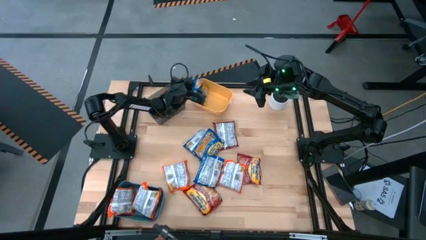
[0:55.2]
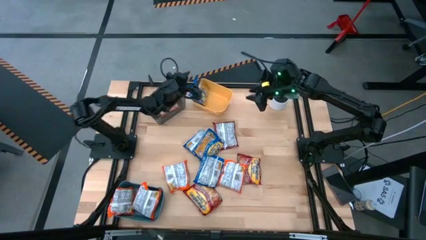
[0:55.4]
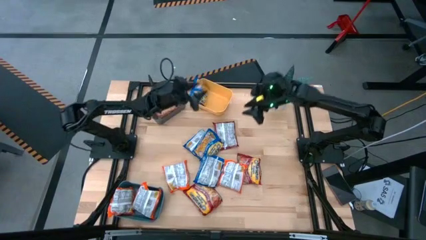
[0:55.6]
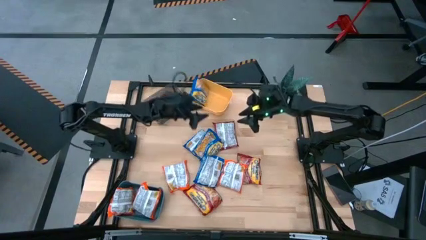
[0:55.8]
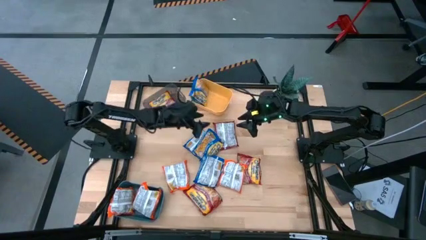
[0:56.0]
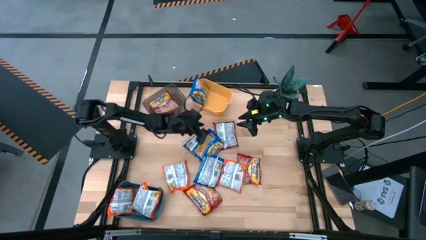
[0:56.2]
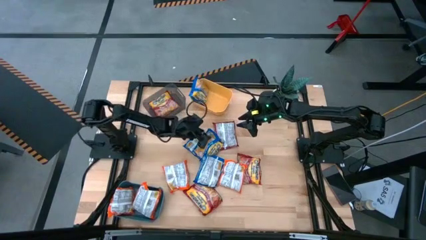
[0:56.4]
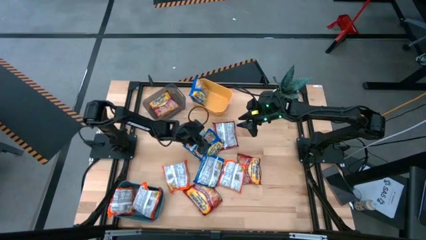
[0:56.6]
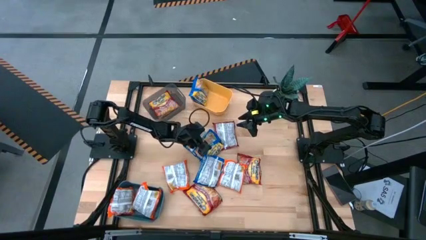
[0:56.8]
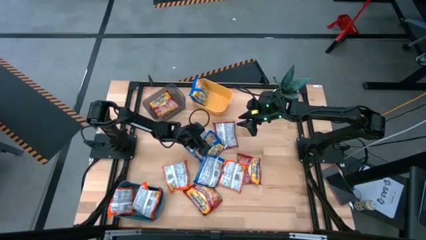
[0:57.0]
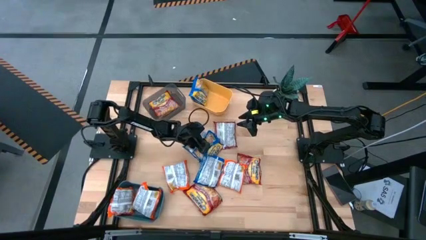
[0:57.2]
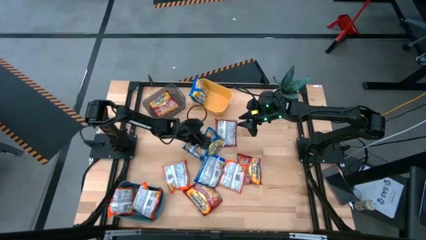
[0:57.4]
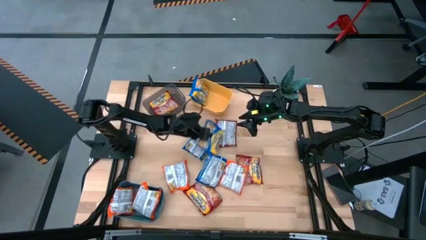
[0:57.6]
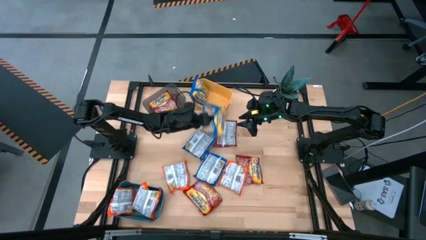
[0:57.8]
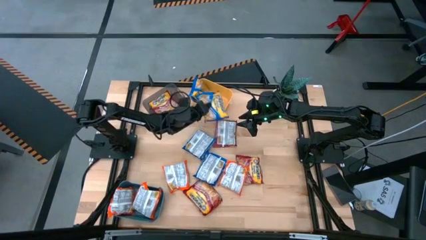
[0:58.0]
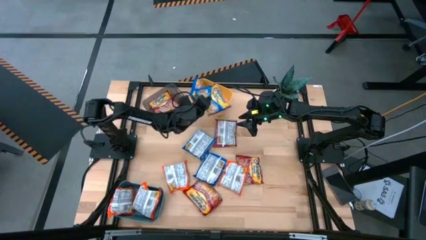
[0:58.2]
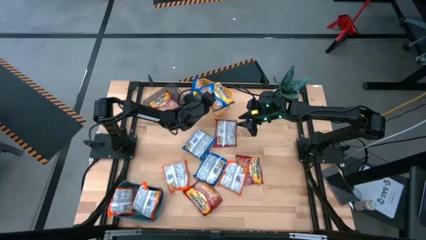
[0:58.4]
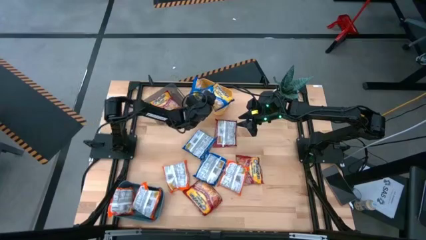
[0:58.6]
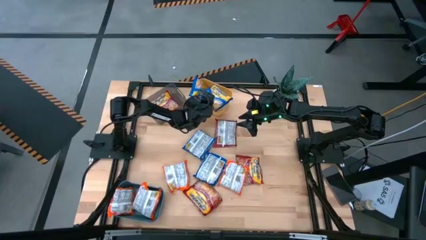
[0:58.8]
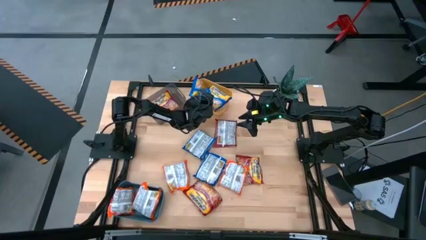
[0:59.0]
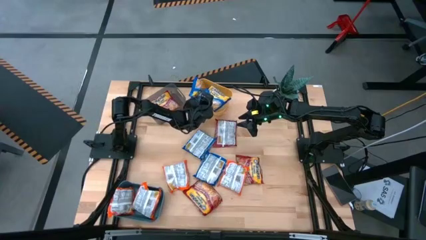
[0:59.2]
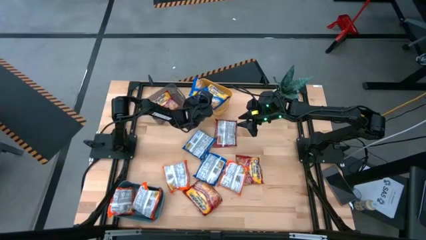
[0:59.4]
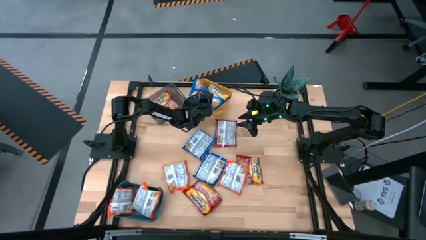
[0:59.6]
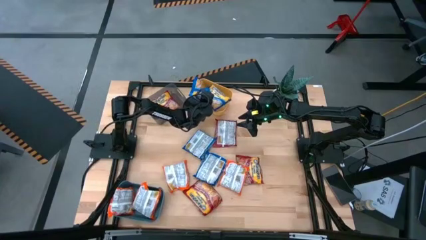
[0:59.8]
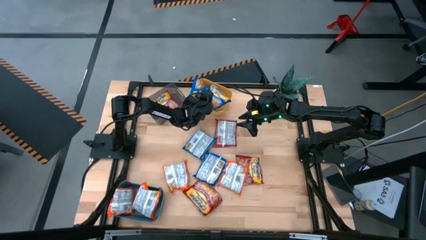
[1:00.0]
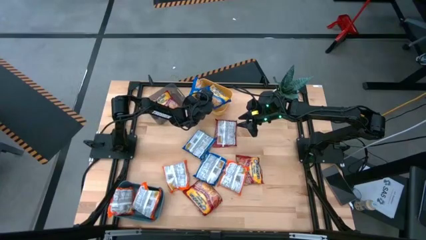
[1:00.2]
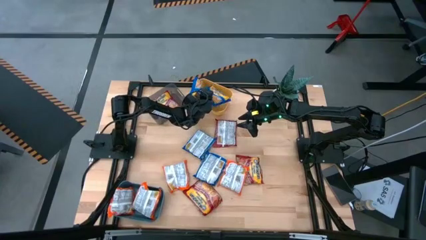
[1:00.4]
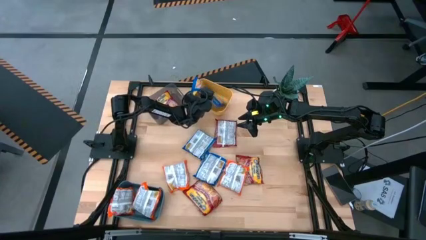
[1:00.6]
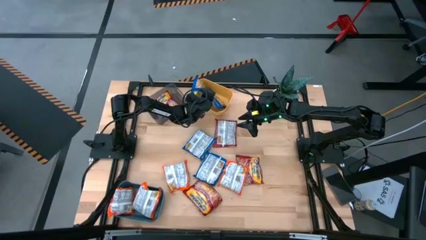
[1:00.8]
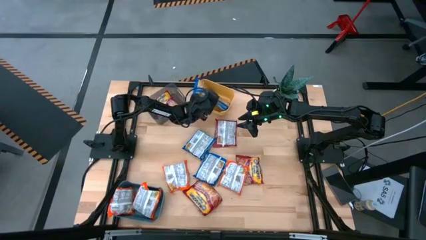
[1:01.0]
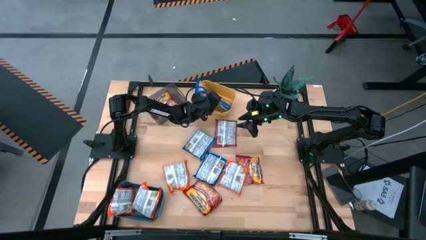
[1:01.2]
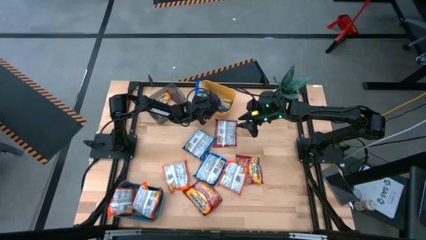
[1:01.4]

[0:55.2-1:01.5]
Task: Sort Maruchan noodles
Put the blue noodle pack into the yellow bin

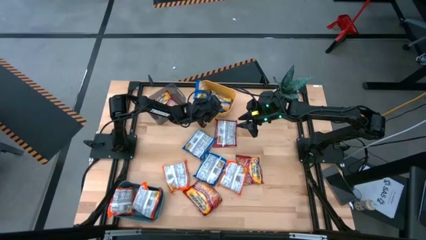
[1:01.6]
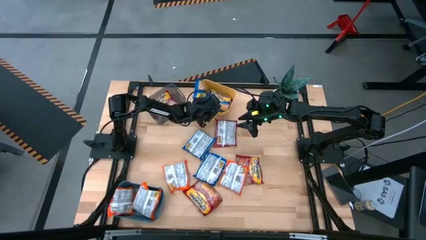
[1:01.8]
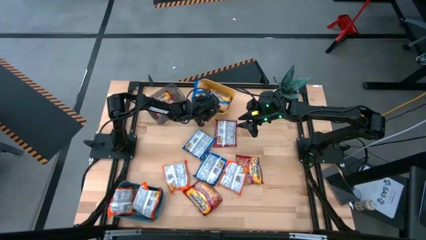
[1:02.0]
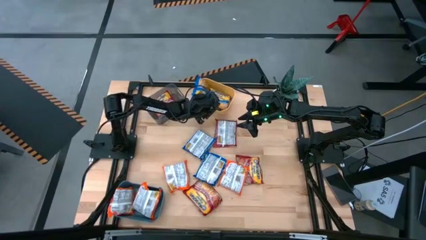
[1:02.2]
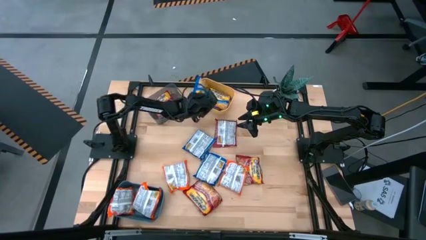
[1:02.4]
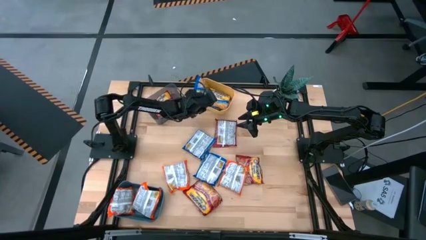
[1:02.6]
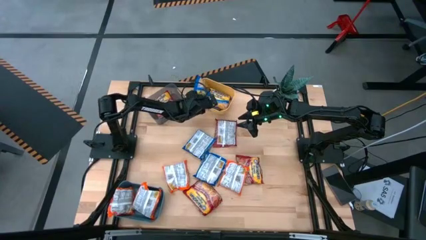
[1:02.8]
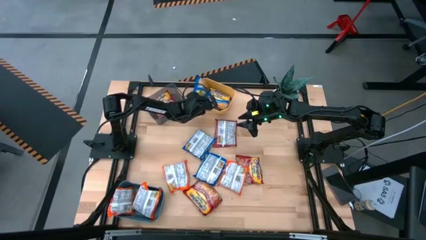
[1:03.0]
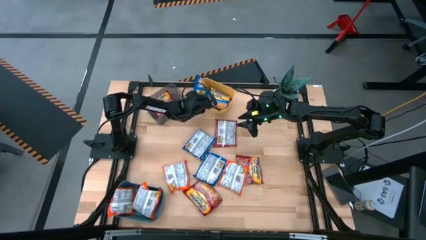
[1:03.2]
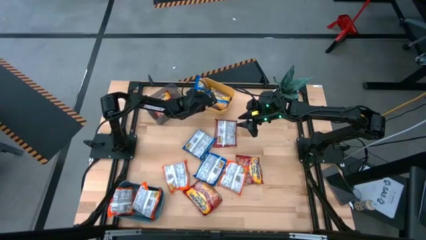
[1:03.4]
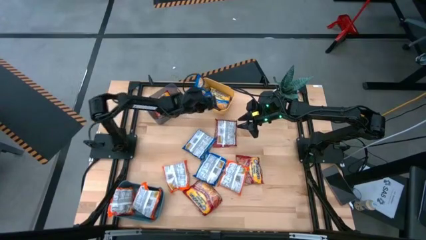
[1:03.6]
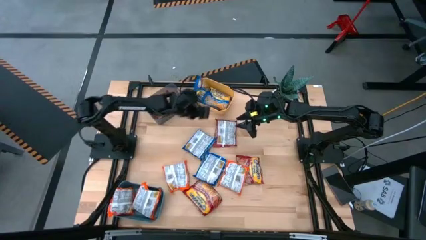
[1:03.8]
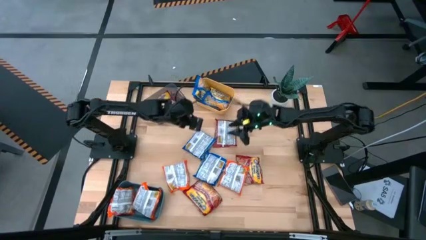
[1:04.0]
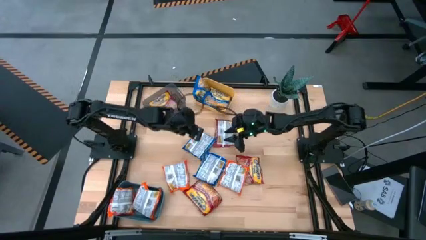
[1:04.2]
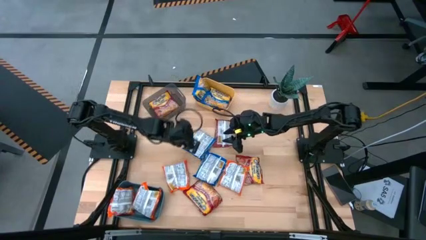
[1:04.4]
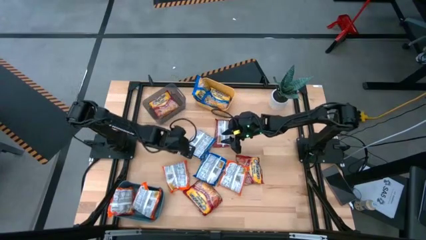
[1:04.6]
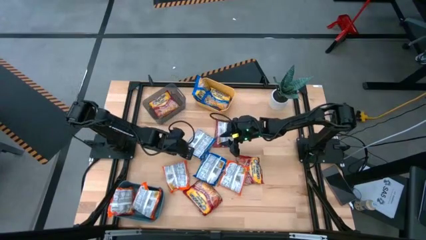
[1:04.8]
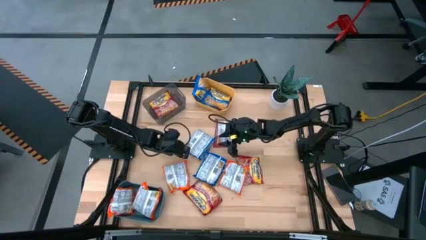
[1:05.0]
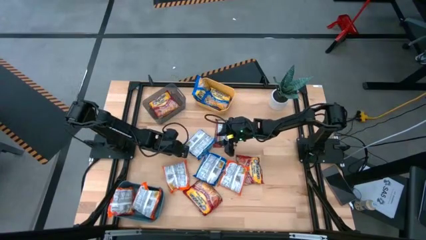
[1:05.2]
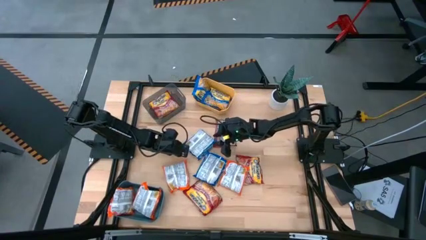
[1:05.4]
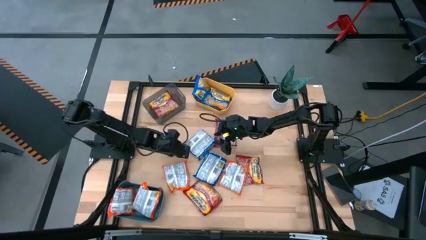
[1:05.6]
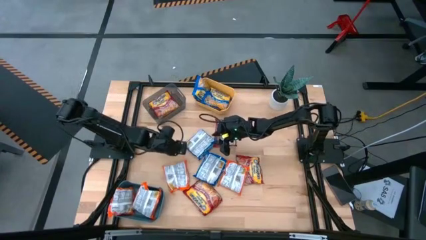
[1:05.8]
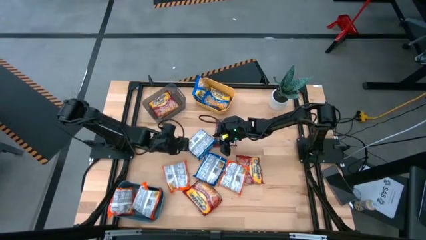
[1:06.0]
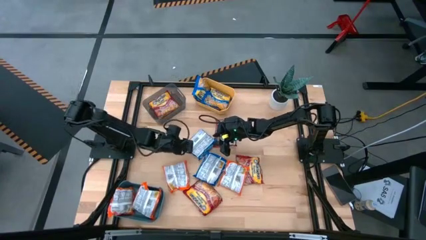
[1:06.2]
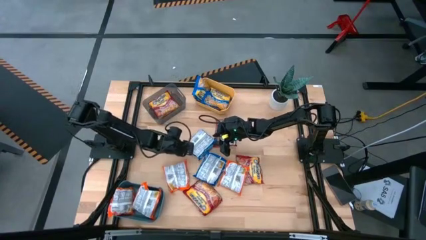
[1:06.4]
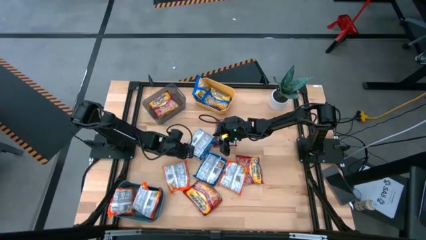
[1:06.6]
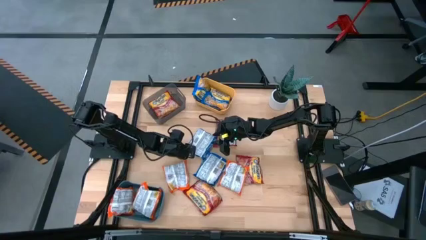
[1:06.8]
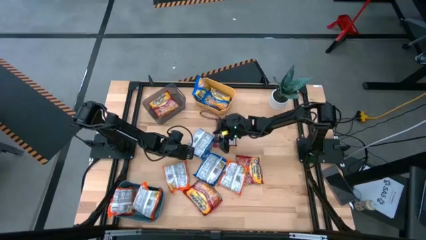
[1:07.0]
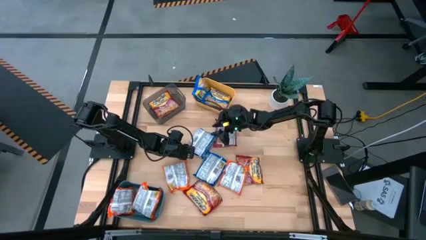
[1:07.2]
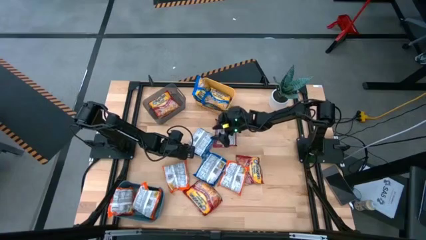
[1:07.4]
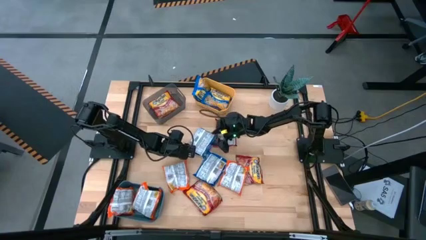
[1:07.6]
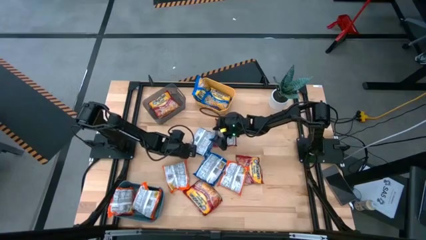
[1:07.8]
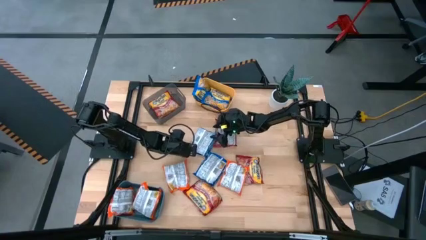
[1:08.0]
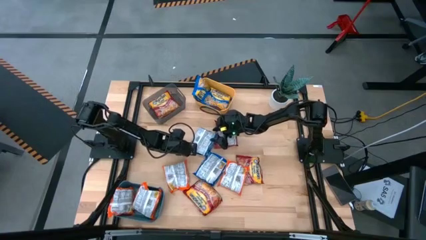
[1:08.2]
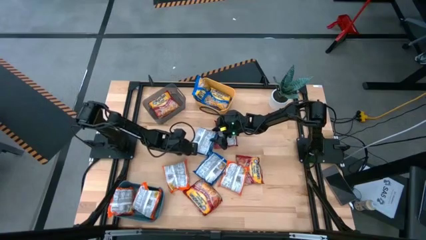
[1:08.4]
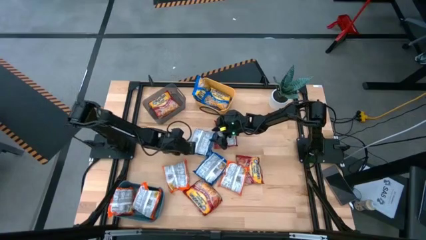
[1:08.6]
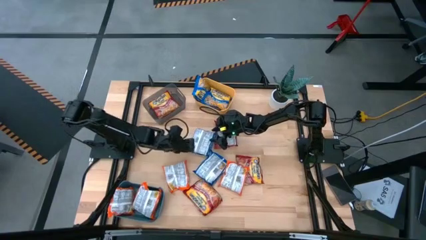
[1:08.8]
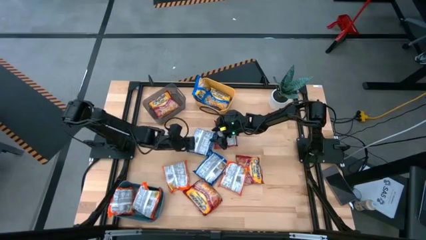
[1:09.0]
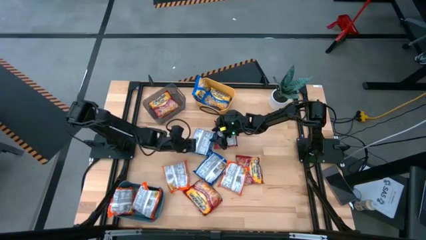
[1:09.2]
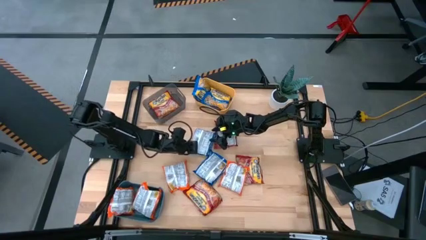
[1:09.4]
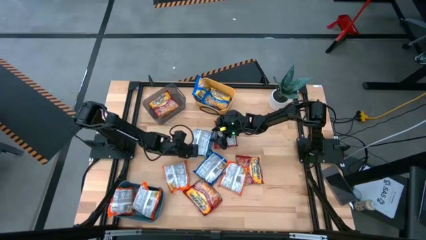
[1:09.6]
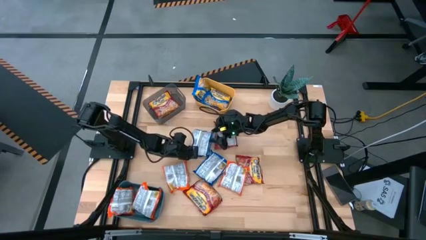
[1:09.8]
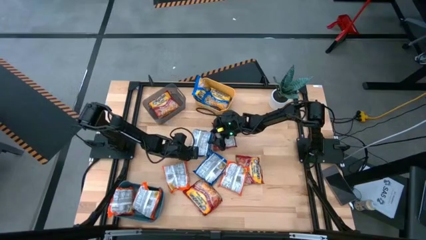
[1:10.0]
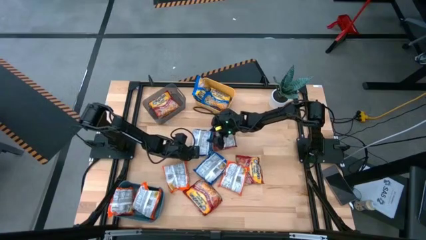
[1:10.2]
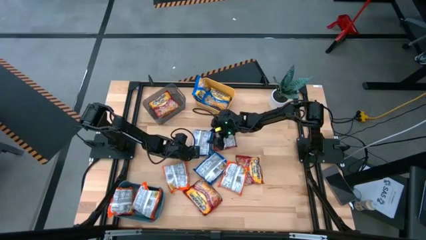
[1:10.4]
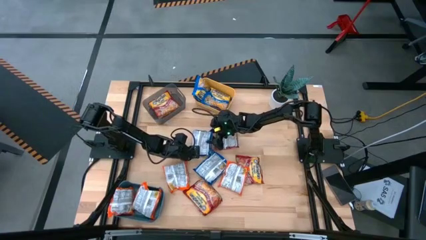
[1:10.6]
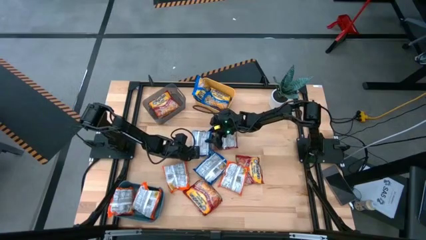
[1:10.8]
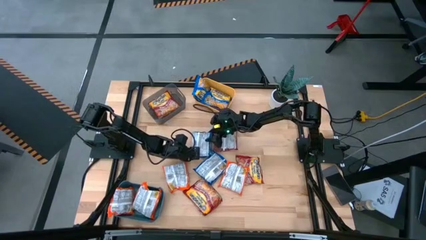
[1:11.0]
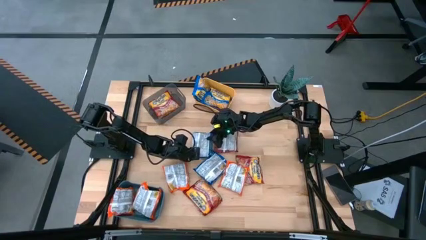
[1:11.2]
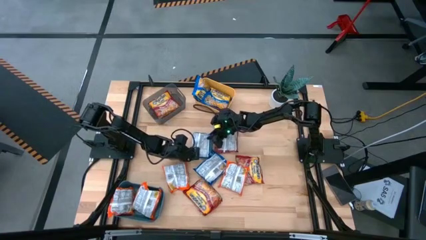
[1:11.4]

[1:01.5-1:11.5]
Put the blue noodle pack into the yellow bin
